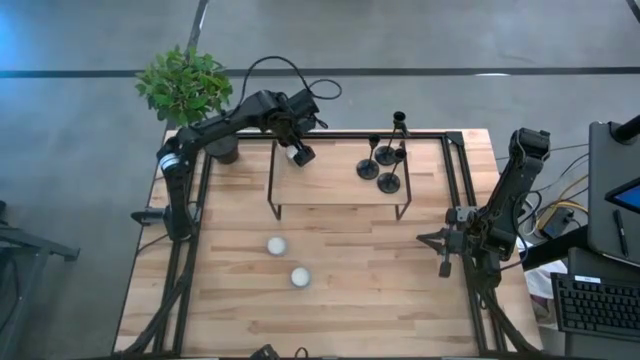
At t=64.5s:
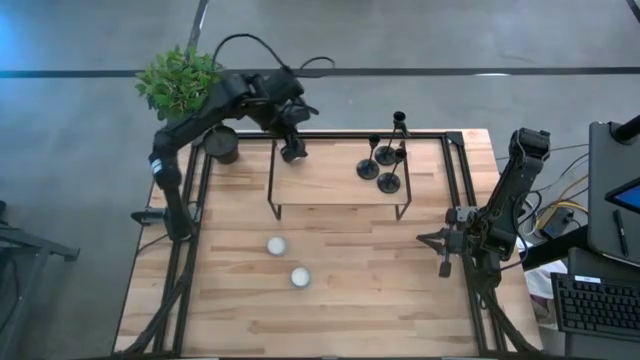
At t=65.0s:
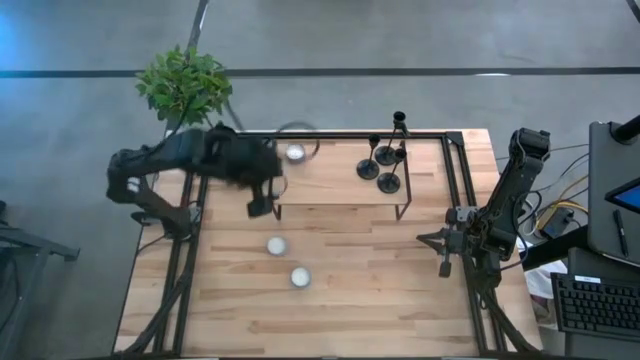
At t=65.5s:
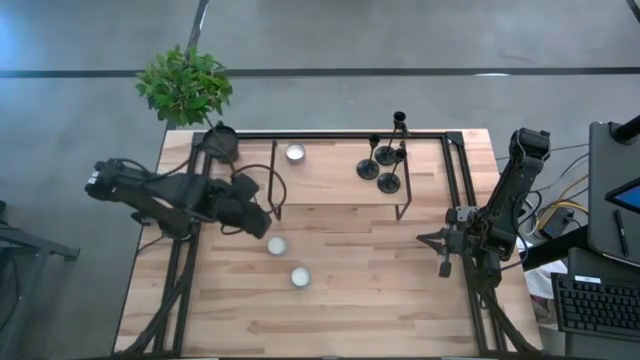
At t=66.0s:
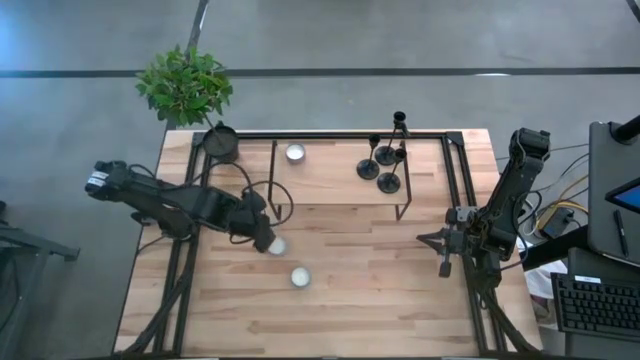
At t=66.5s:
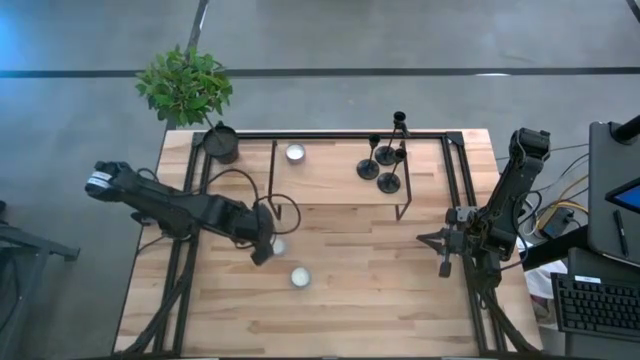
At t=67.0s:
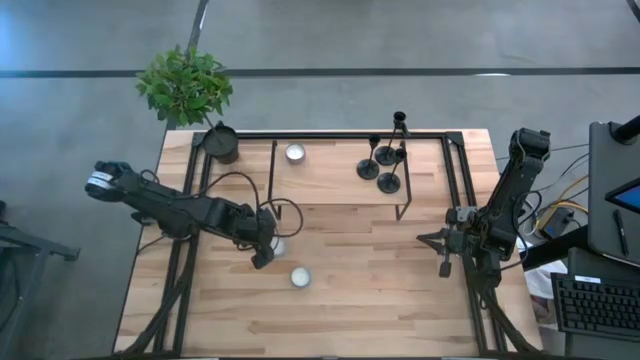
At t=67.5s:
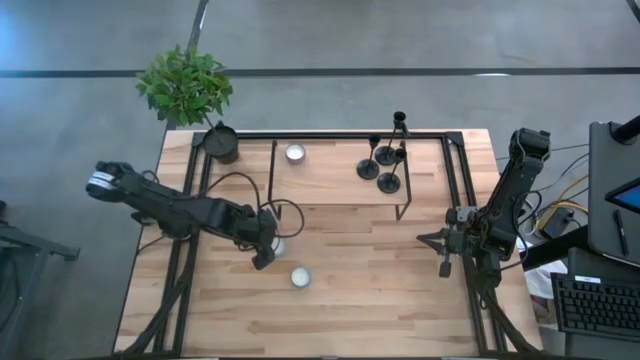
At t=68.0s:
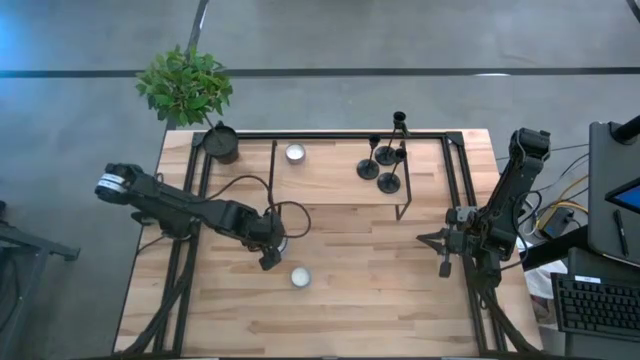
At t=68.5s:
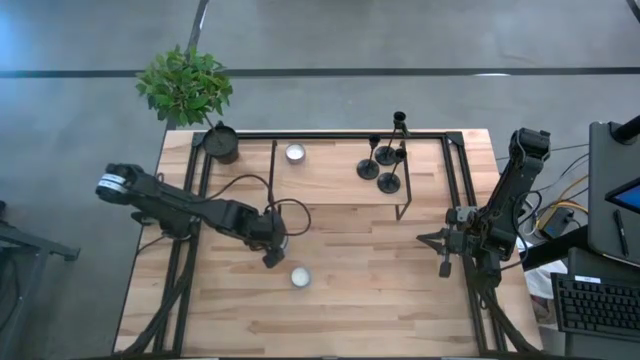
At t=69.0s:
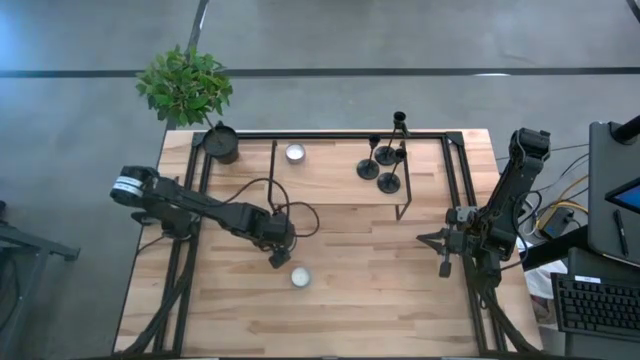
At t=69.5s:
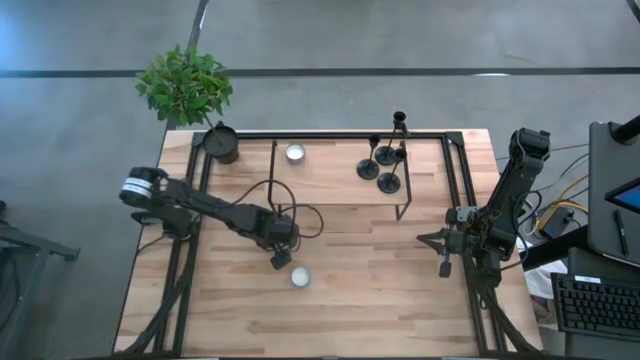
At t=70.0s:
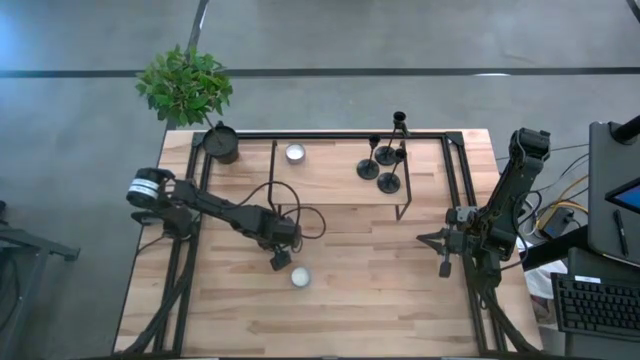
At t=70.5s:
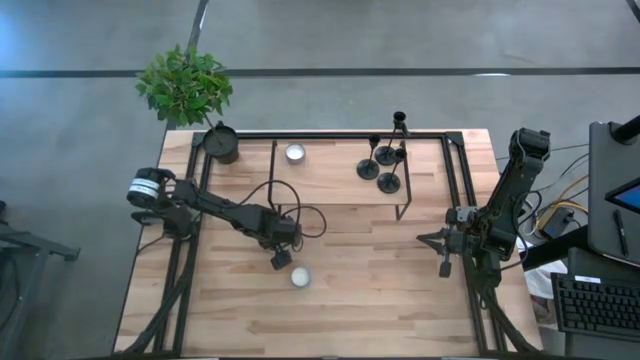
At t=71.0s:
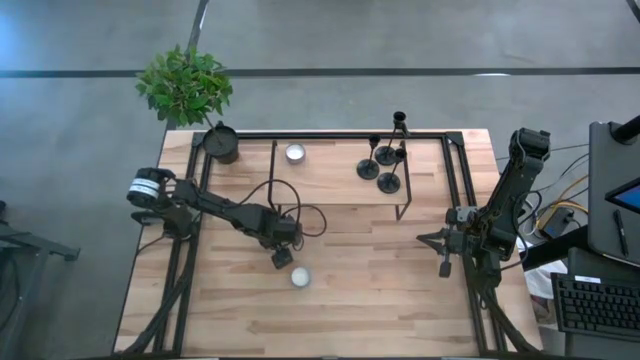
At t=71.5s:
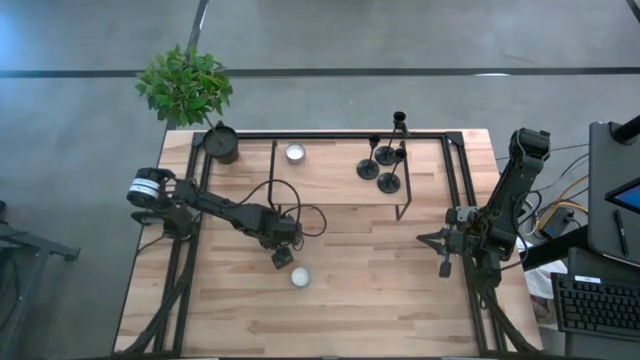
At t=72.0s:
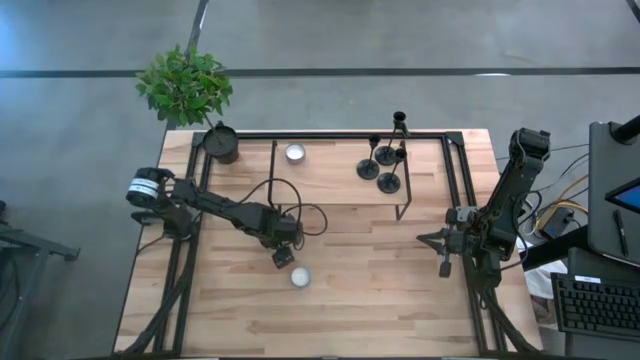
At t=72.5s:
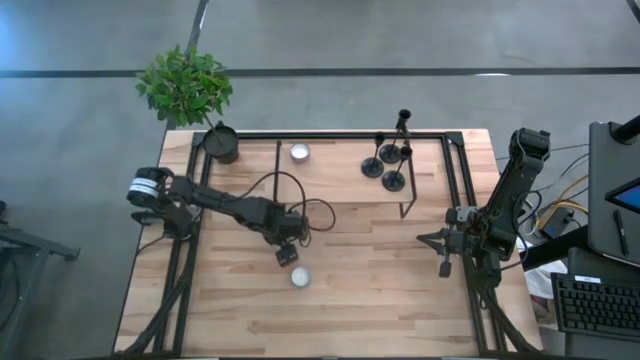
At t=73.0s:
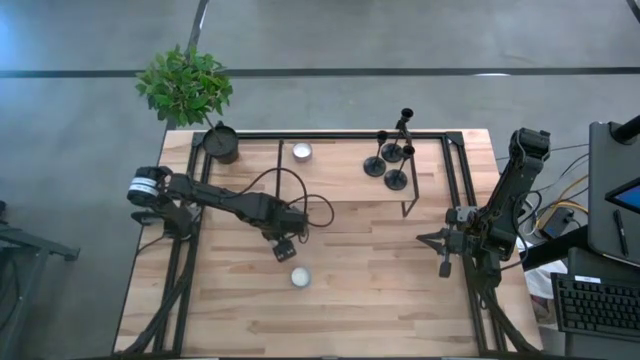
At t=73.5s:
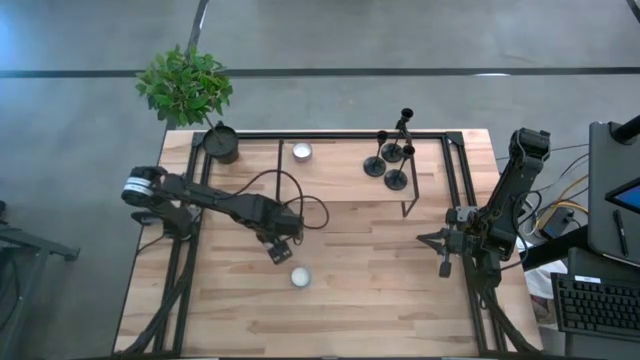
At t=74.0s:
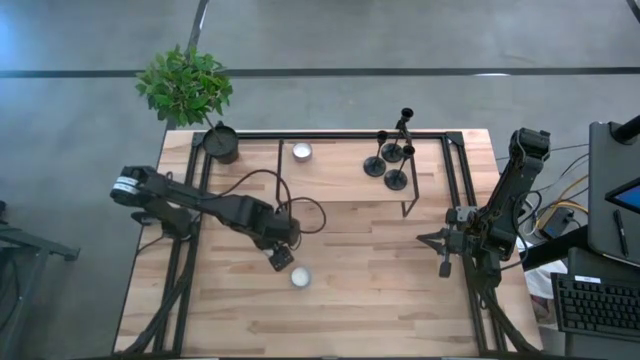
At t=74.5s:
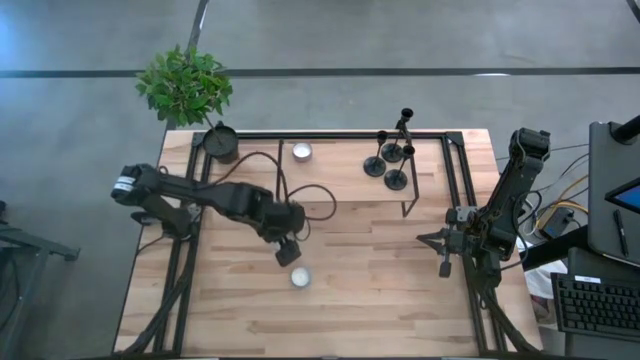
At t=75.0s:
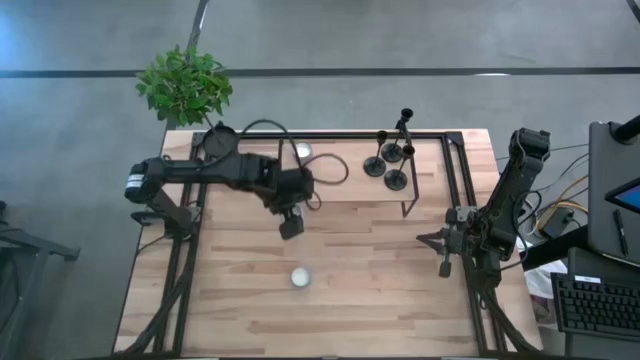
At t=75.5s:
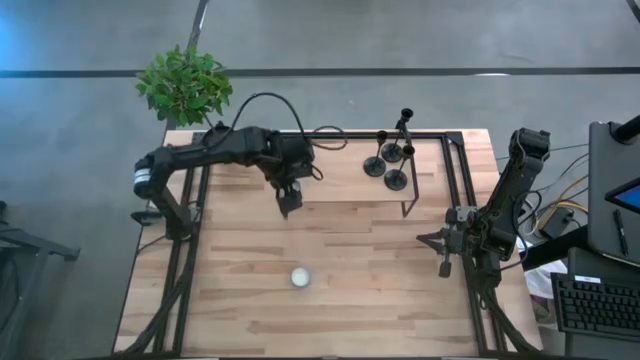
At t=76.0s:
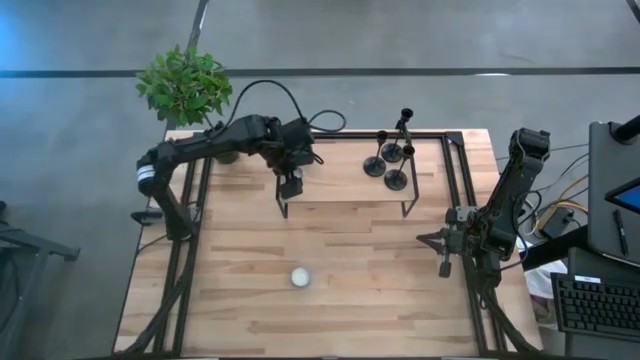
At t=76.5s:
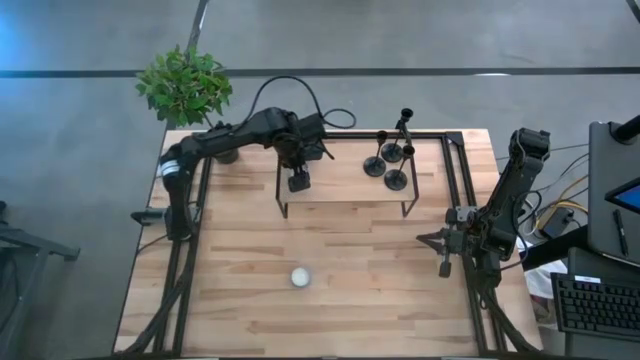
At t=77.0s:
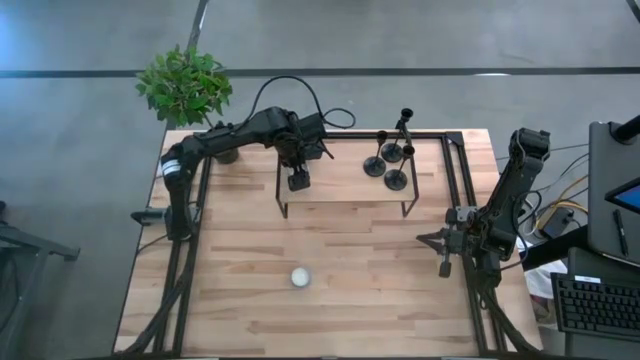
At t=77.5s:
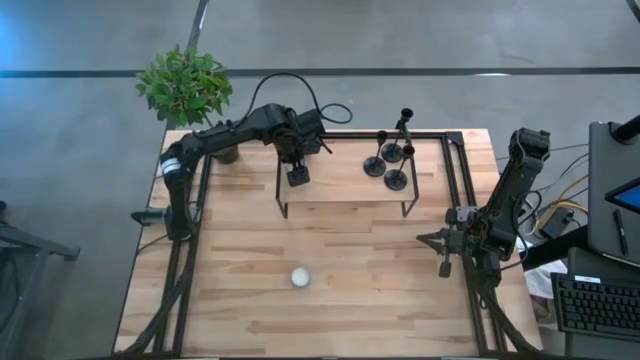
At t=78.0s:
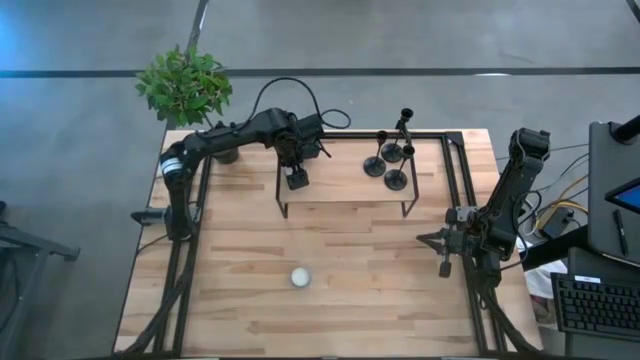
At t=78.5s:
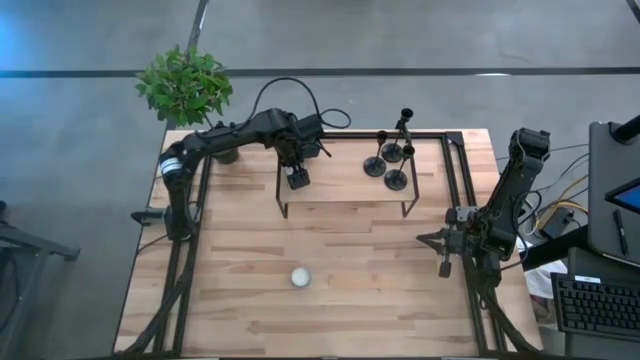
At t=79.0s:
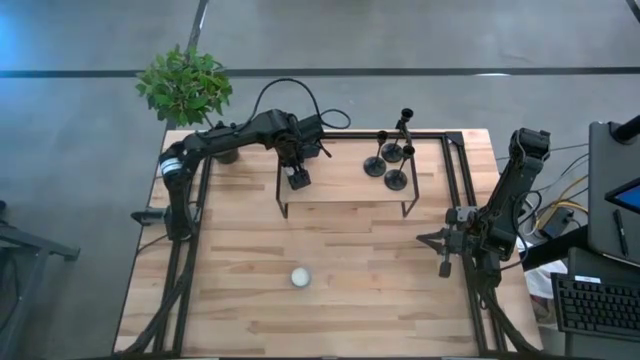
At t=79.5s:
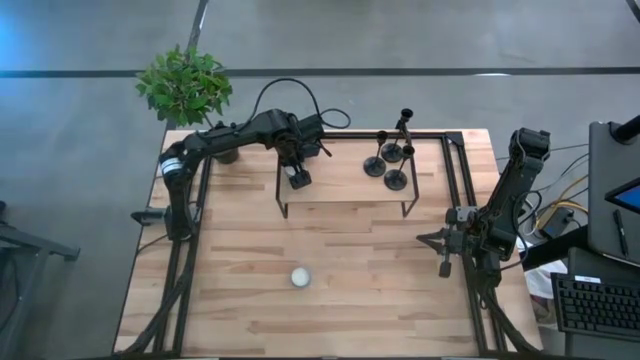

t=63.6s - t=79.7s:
Task: Pick & Place candle stick holders
Put the red scented candle on the shelf

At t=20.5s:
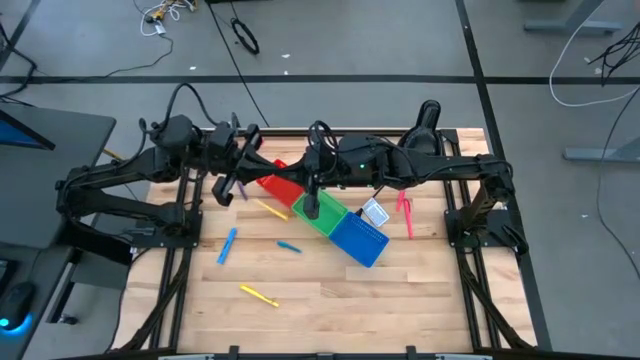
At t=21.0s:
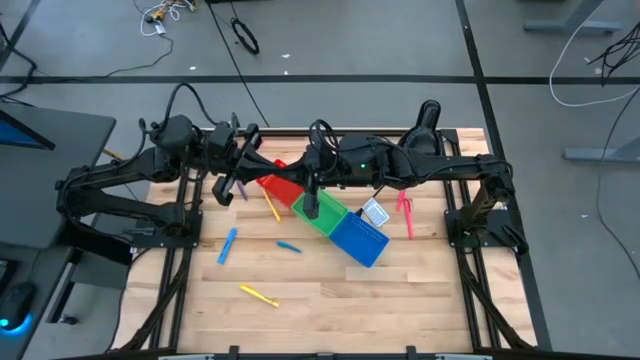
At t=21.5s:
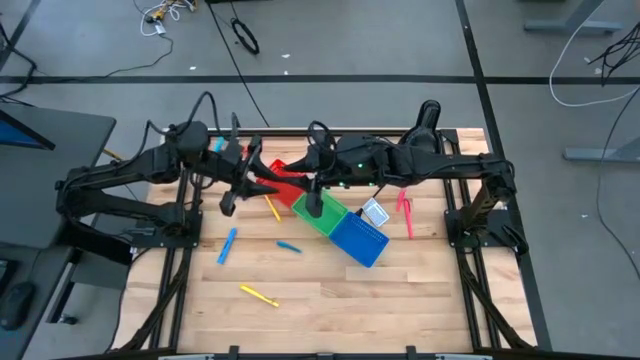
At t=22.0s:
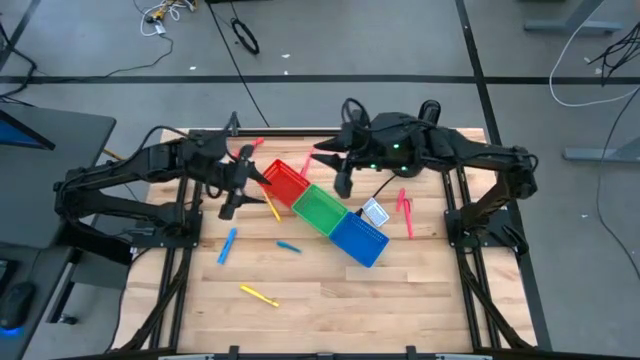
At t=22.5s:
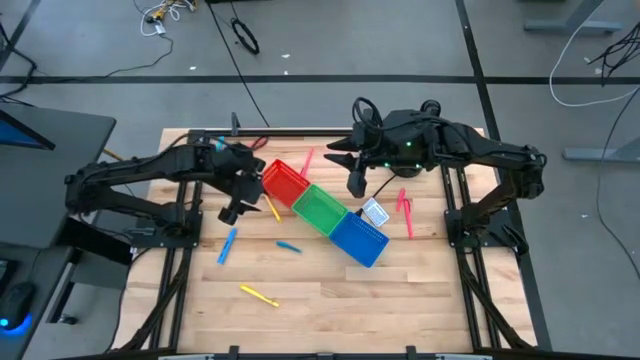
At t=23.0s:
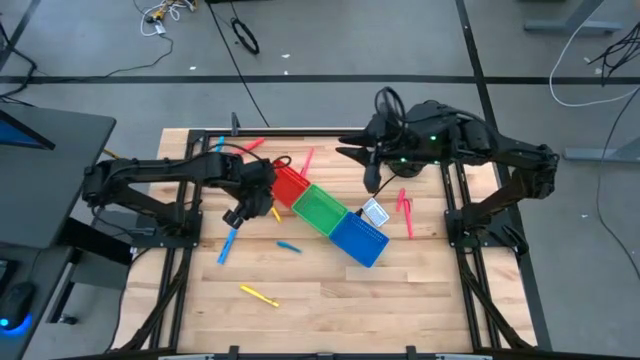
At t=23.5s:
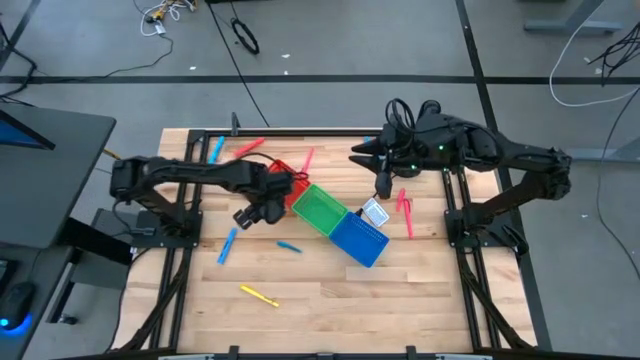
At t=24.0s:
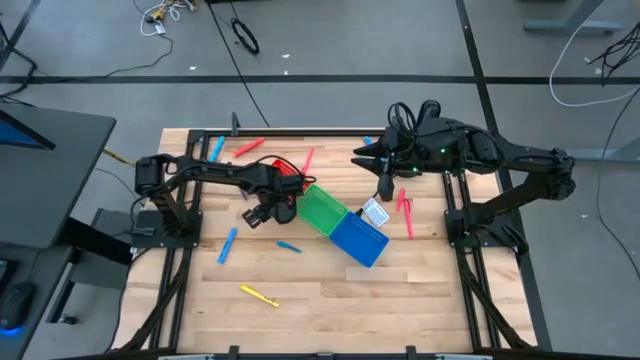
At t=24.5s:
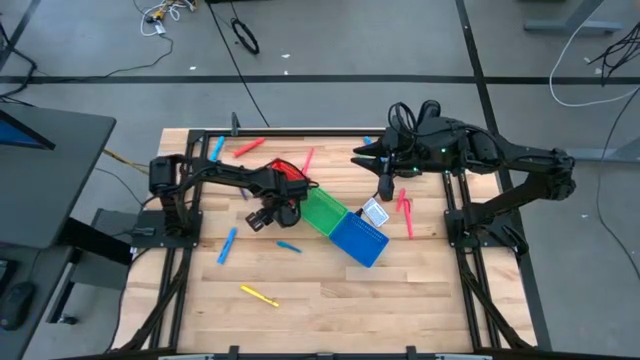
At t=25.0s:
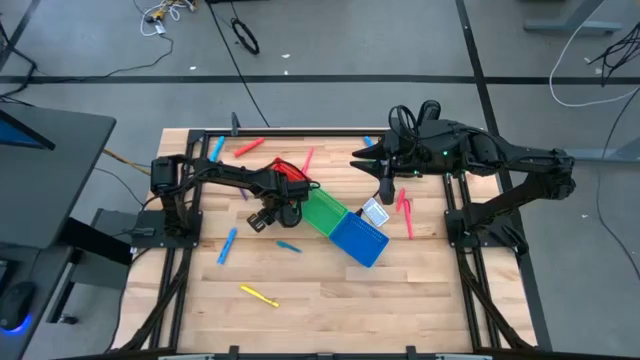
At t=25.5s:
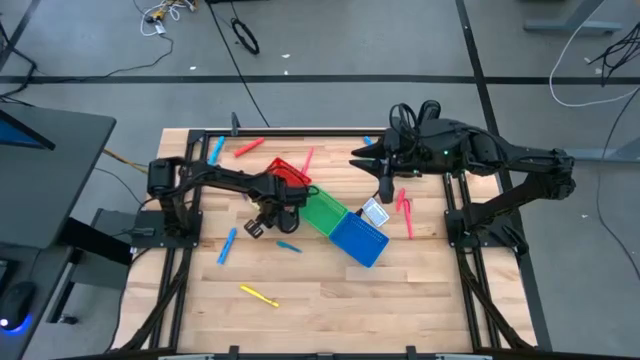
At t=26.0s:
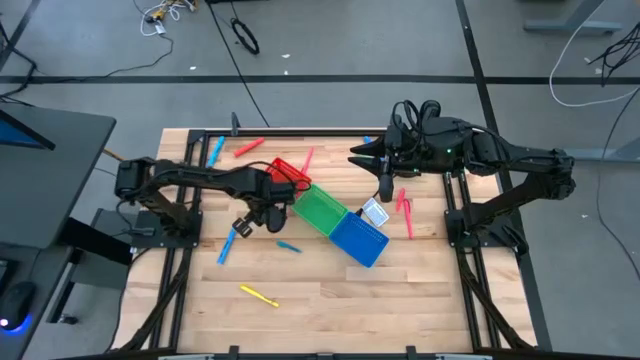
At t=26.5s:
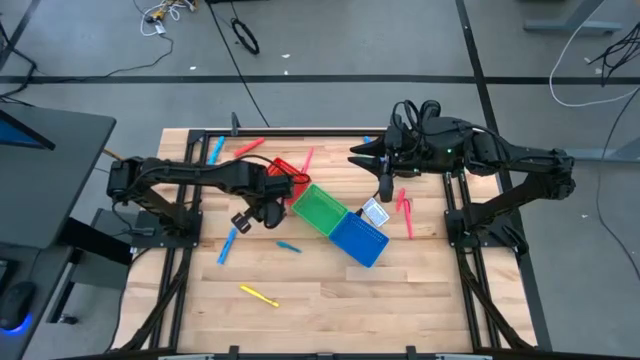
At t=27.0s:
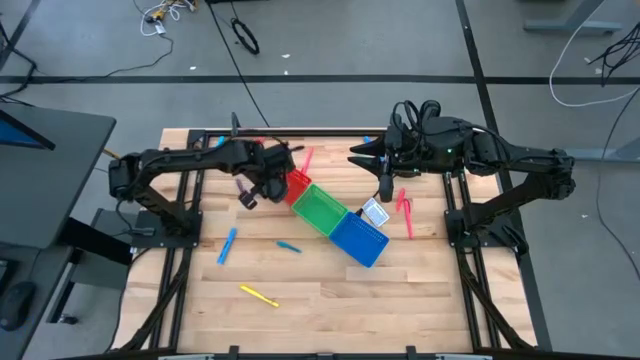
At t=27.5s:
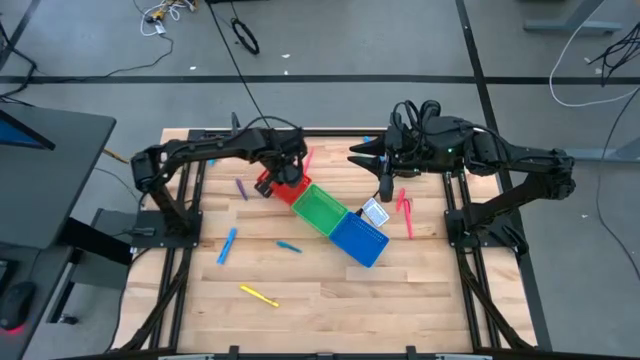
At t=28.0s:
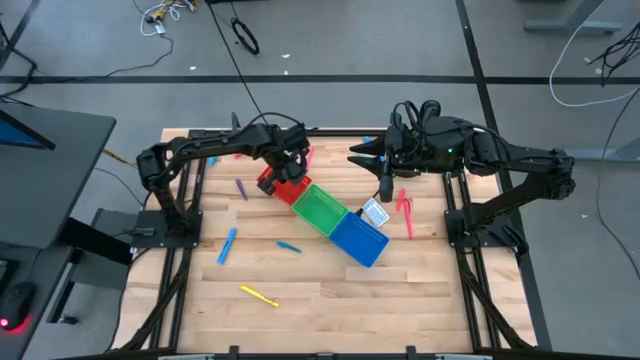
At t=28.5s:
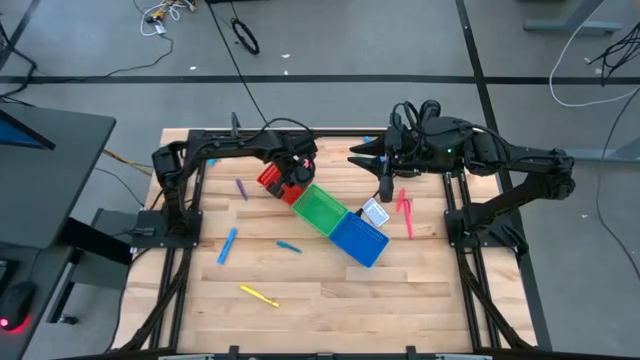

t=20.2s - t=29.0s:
Task: Pick & Place Markers
Put the right yellow marker pen into the red bin
